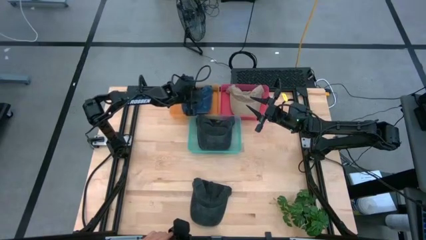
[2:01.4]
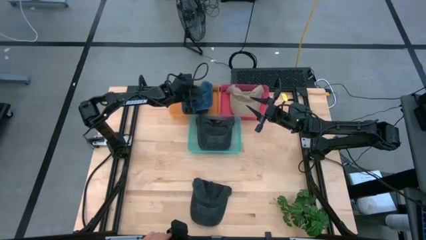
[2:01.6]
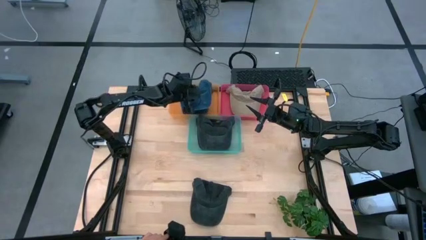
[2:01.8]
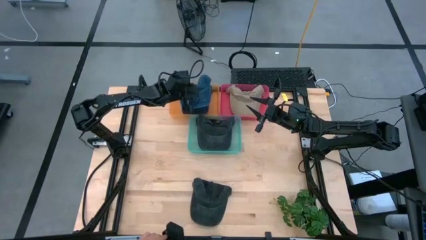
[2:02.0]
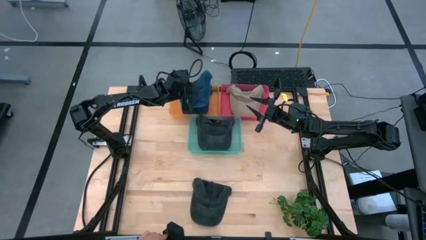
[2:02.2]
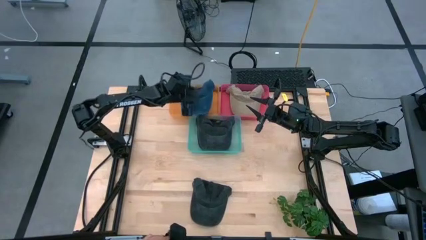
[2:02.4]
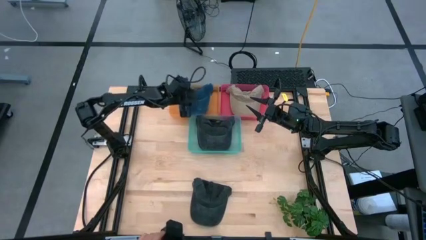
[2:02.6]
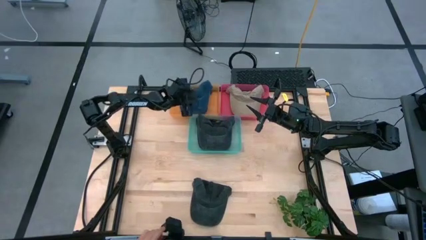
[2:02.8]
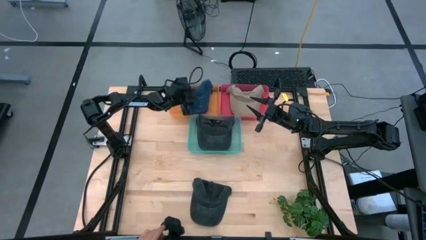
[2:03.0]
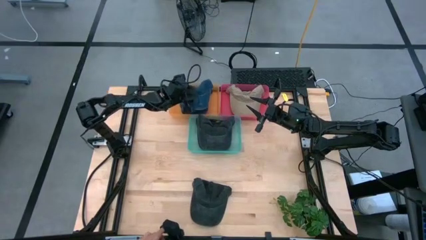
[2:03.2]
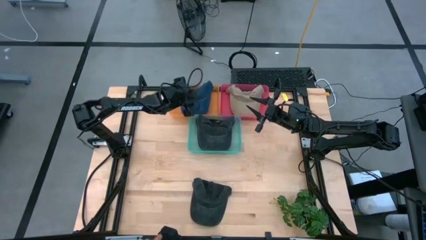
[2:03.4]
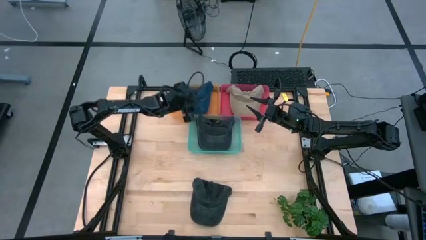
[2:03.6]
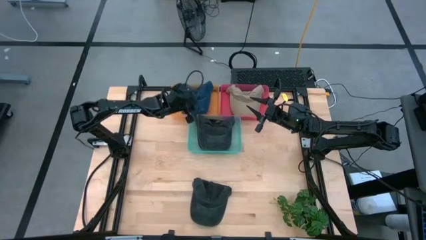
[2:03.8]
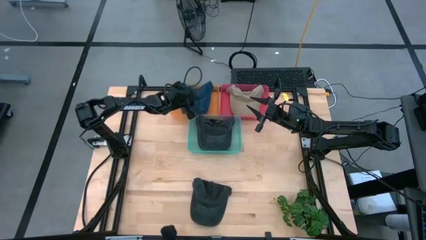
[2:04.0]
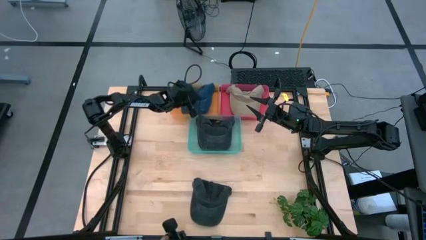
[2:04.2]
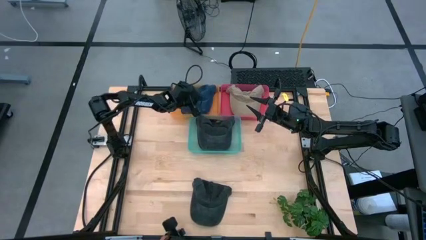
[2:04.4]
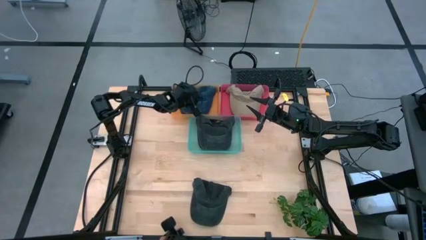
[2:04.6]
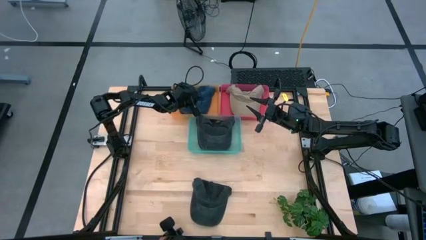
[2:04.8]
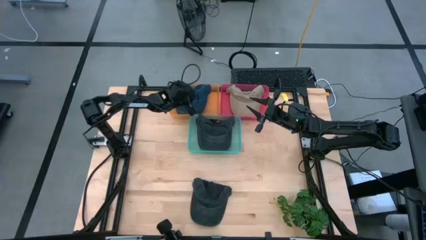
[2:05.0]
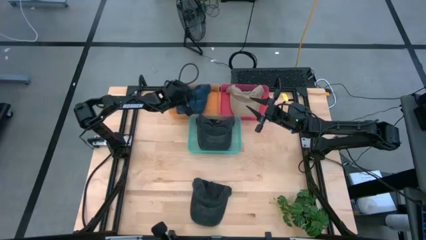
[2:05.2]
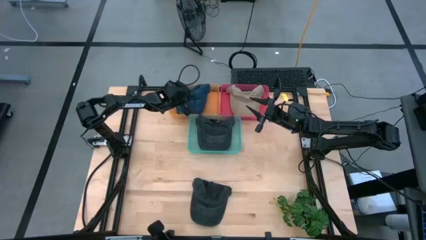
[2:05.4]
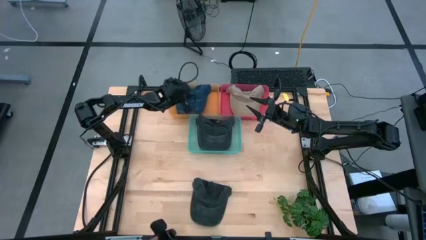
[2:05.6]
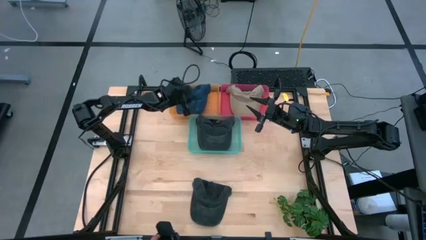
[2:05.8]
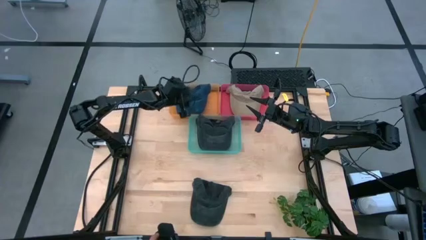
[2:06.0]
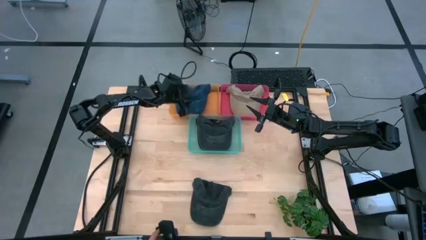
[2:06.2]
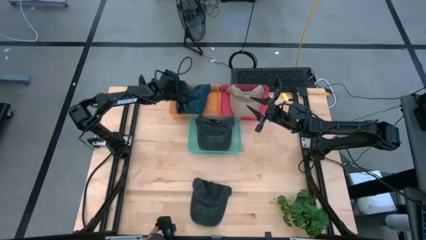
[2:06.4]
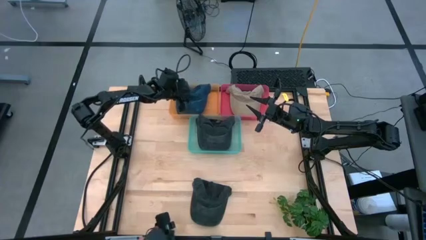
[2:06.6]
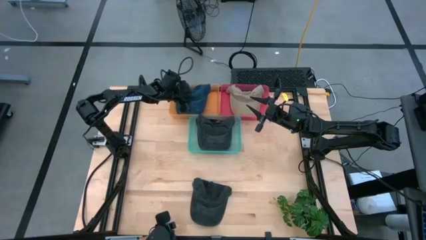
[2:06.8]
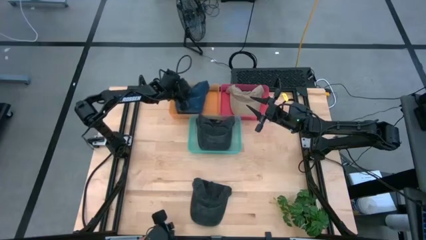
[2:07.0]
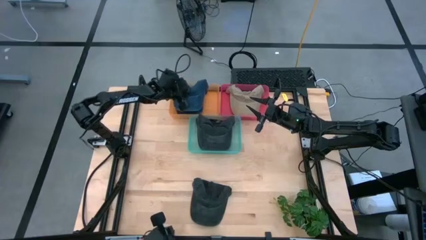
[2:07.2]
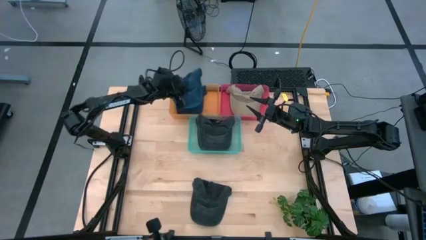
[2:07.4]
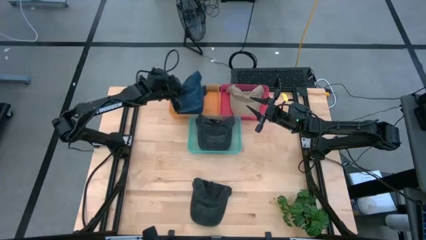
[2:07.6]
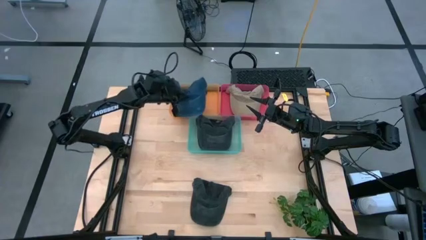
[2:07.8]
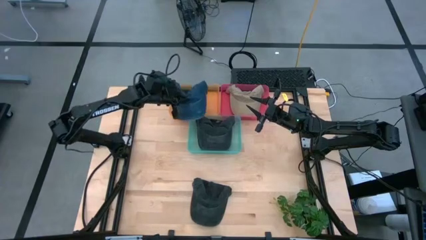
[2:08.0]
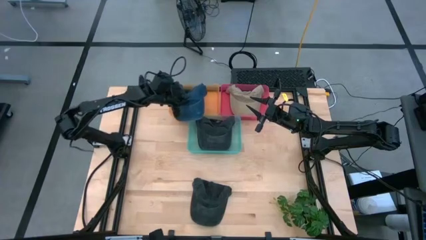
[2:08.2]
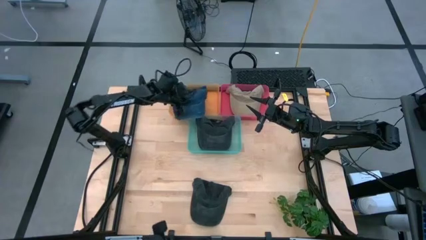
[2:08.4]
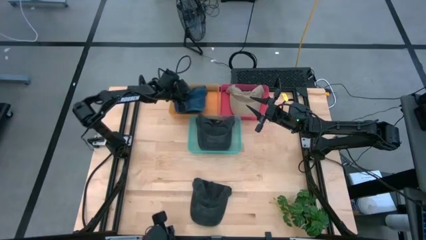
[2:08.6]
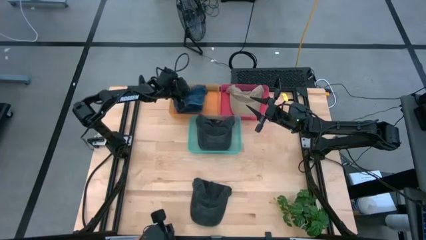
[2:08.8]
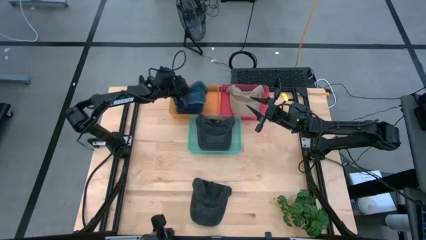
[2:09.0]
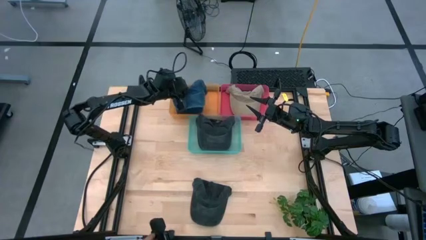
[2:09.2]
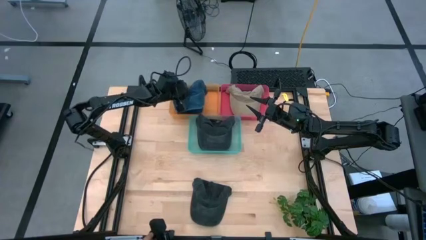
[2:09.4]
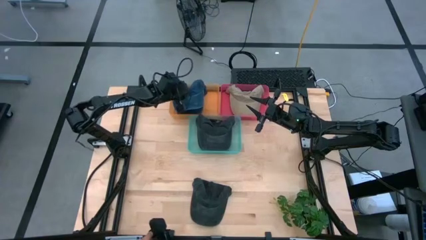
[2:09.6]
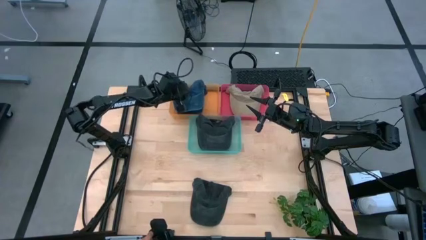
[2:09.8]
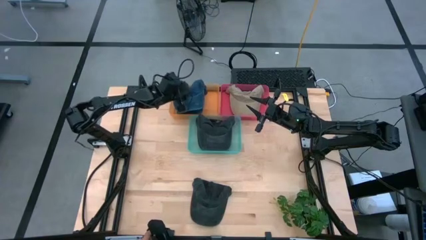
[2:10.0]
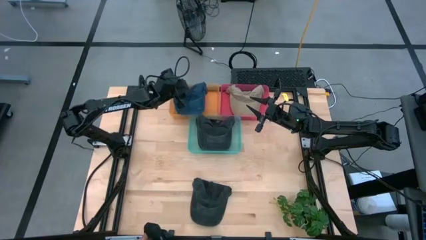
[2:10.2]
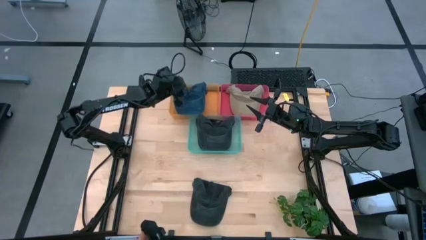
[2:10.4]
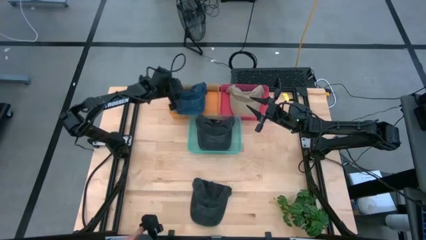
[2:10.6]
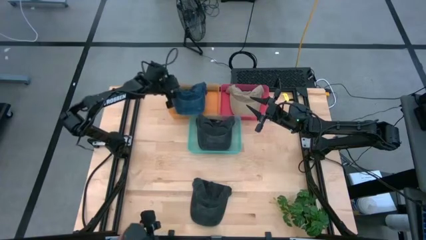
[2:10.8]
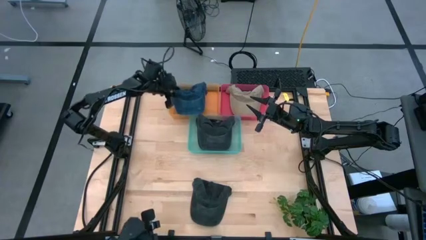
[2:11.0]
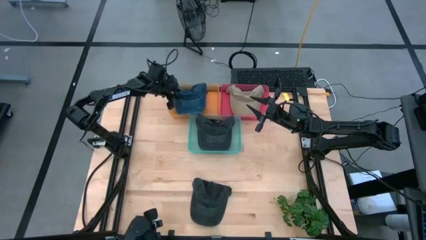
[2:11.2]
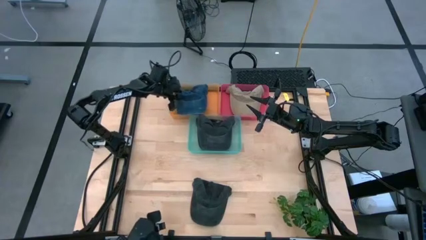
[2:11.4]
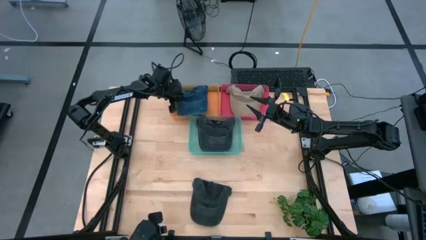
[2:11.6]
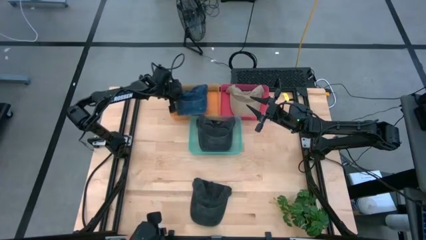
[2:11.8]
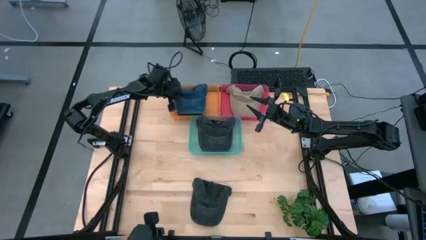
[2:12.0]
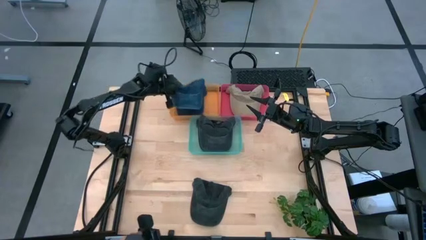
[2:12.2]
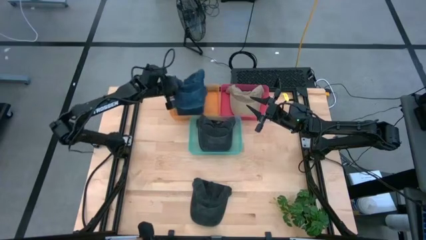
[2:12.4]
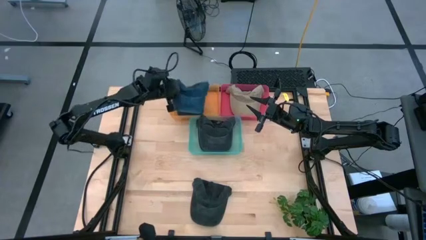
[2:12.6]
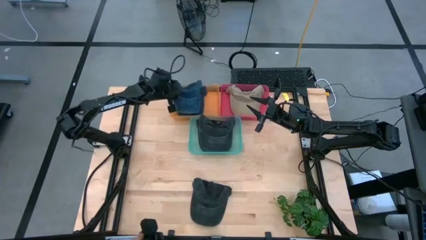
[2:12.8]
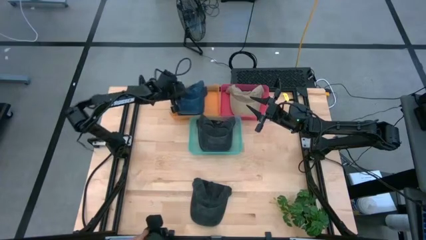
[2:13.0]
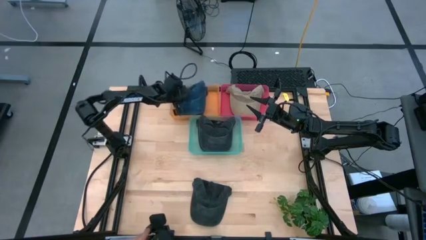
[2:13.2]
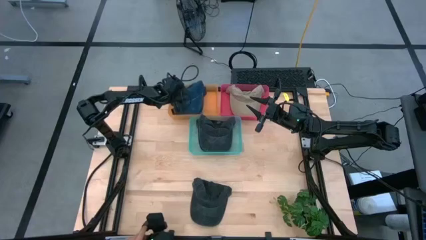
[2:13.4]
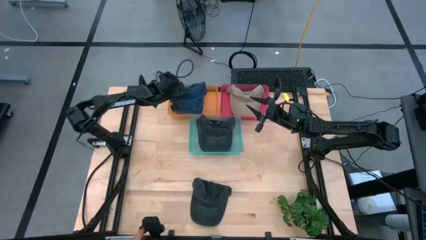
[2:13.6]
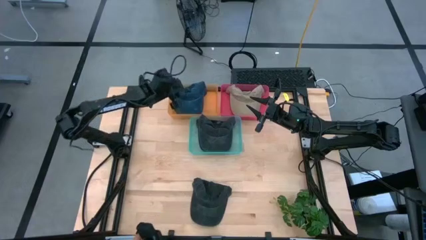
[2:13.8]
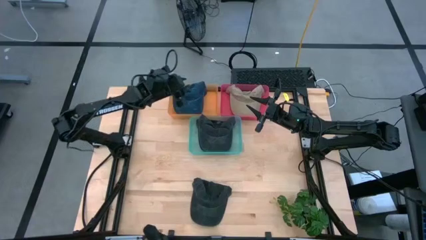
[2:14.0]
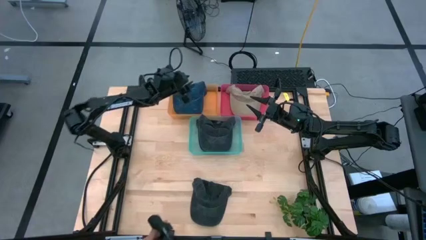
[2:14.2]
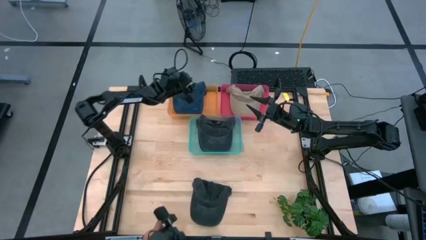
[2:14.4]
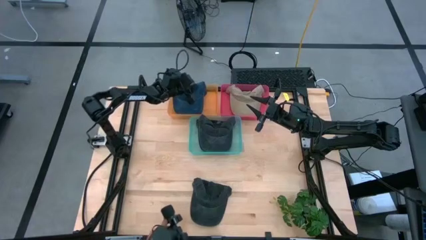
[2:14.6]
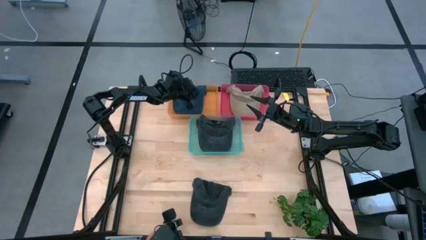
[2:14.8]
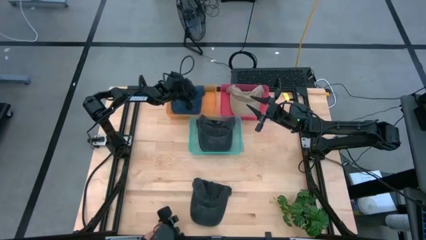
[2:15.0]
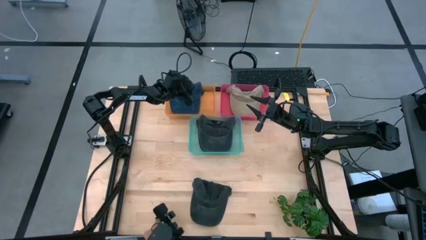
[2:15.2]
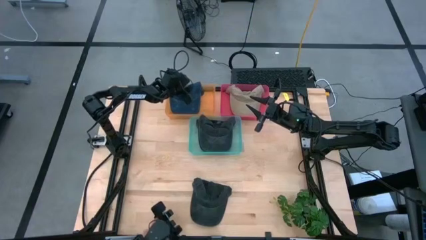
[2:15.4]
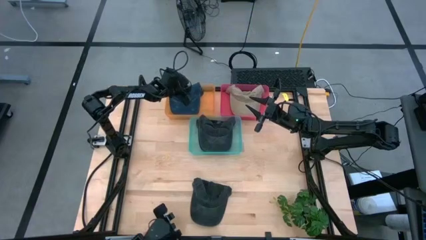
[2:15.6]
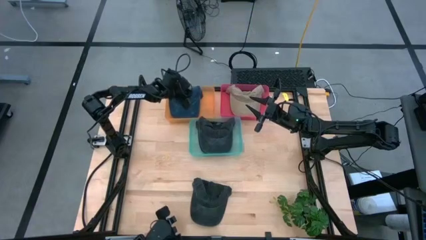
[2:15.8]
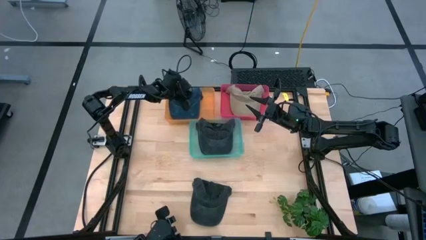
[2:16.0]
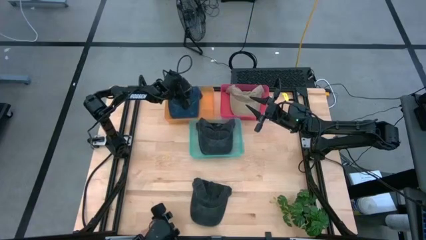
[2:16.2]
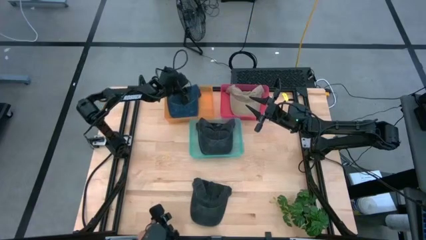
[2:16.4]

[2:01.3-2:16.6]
Task: Pick & Place hat
Put the blue cap into the orange bin

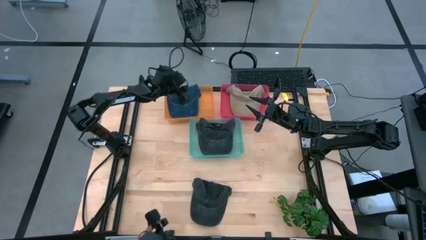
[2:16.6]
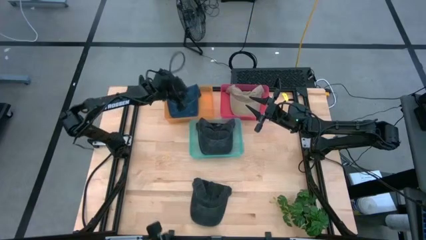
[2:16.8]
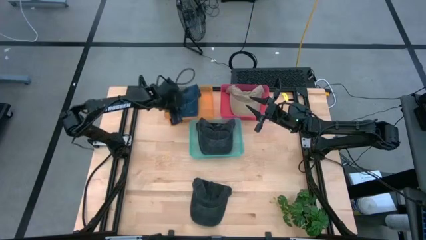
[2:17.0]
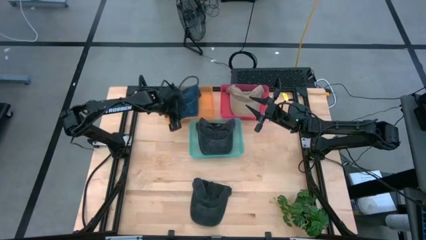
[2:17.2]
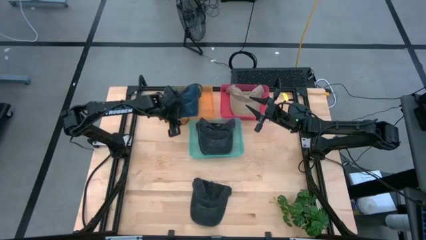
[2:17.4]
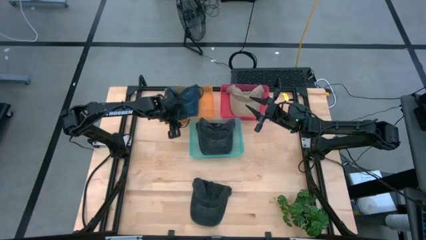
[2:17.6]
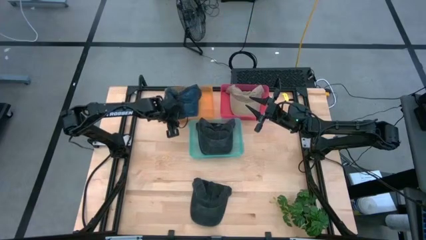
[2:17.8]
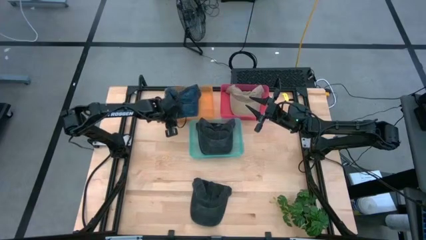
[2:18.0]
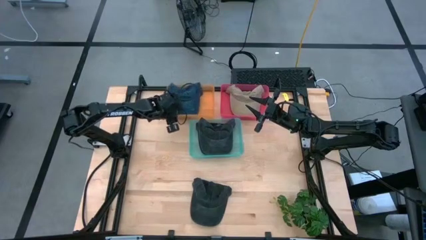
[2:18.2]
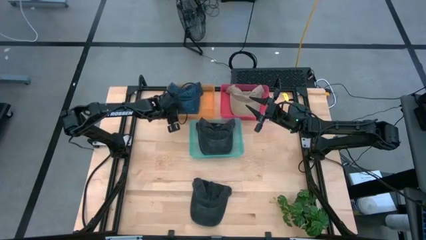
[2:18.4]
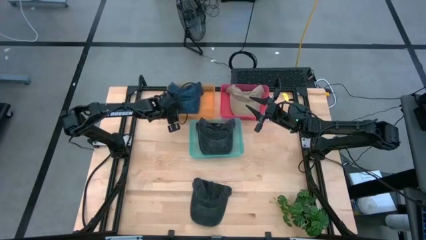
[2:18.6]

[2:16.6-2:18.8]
Adjust the orange bin
